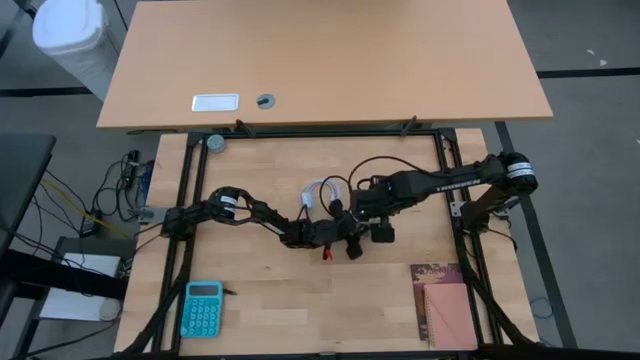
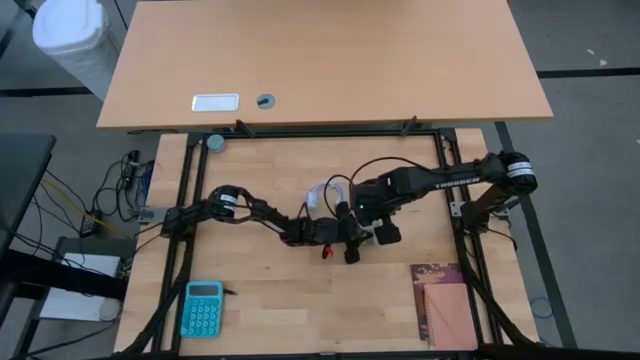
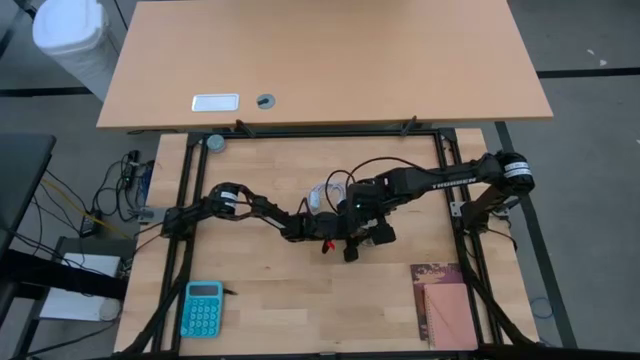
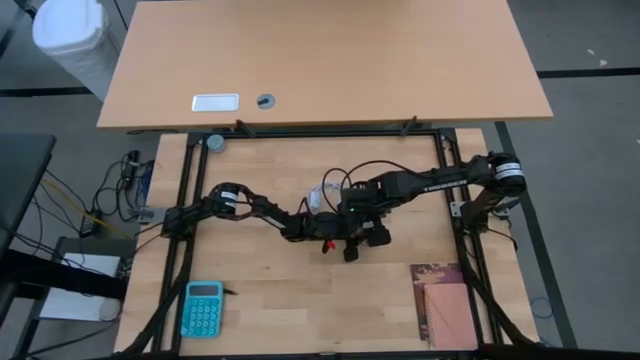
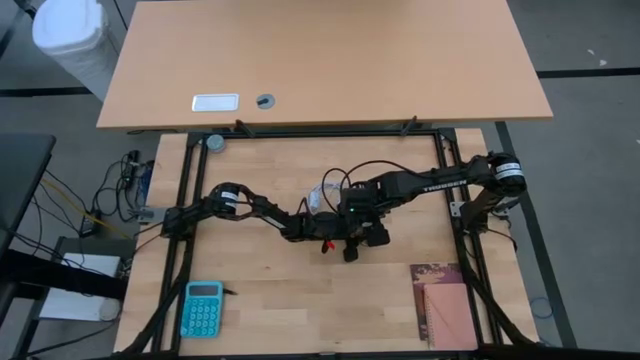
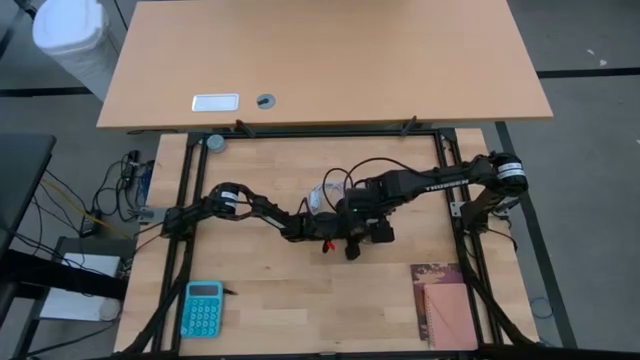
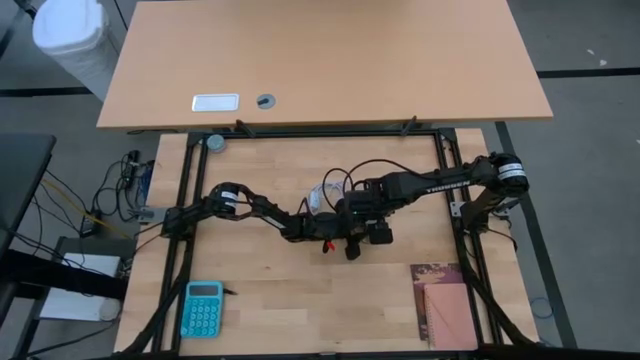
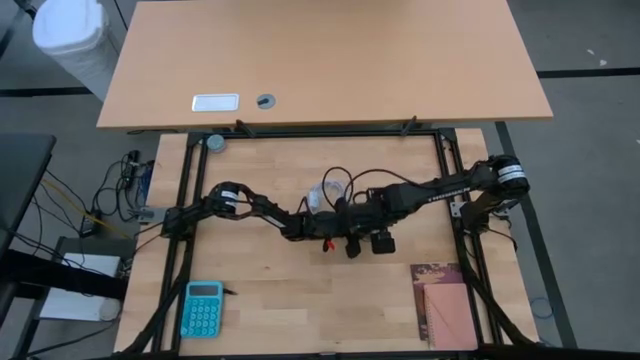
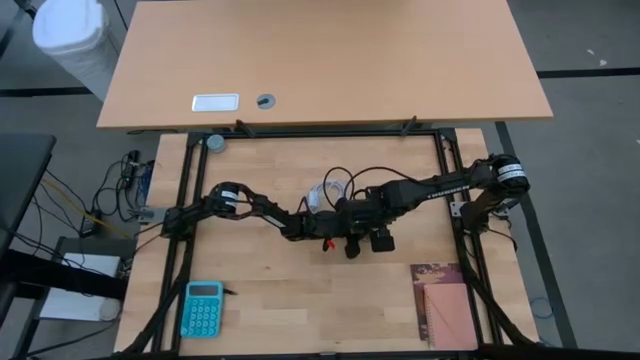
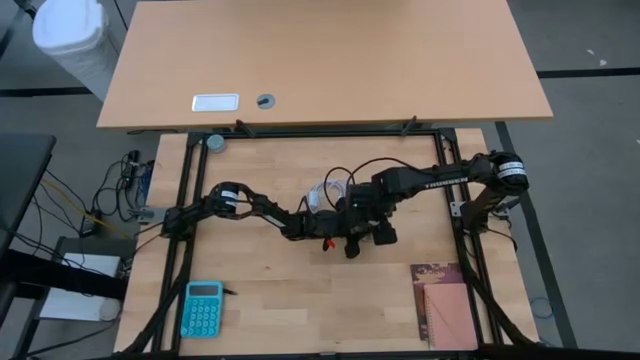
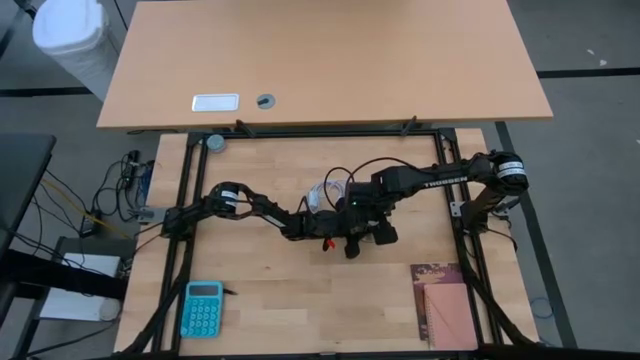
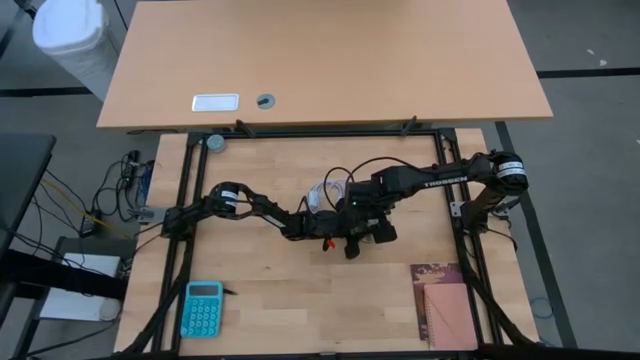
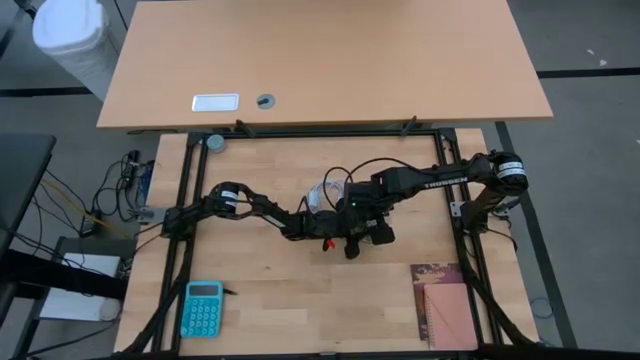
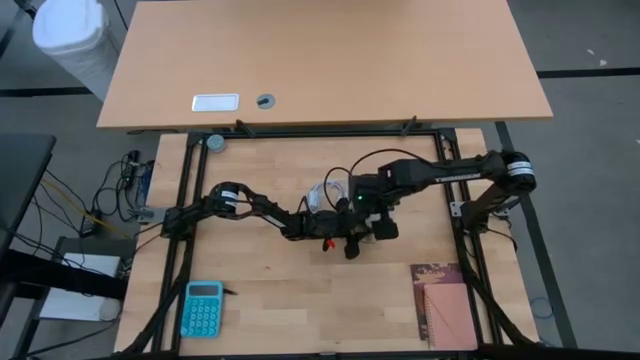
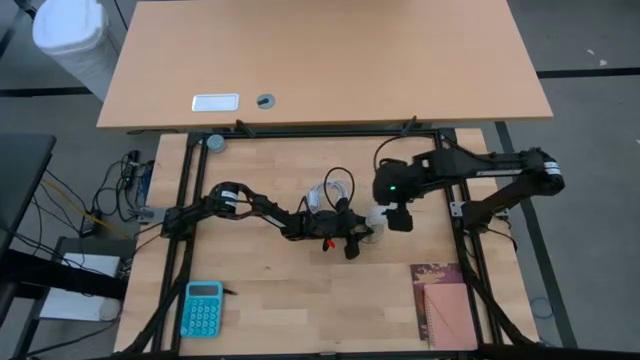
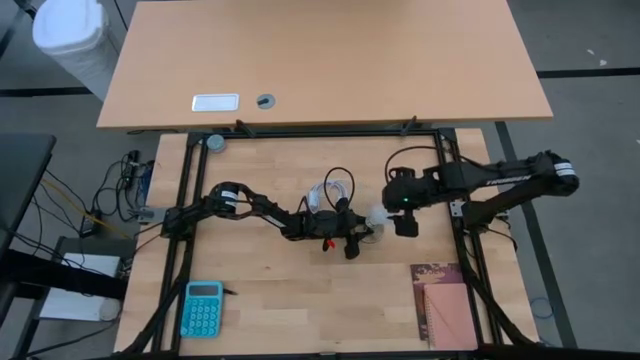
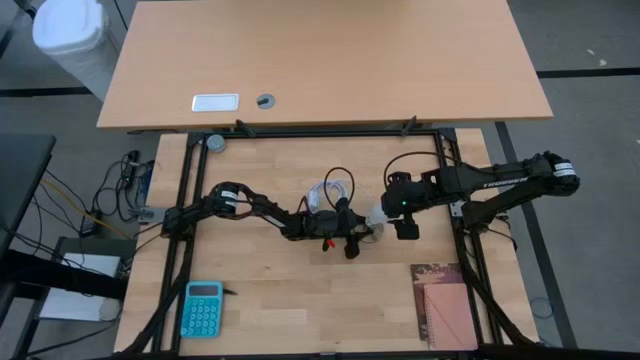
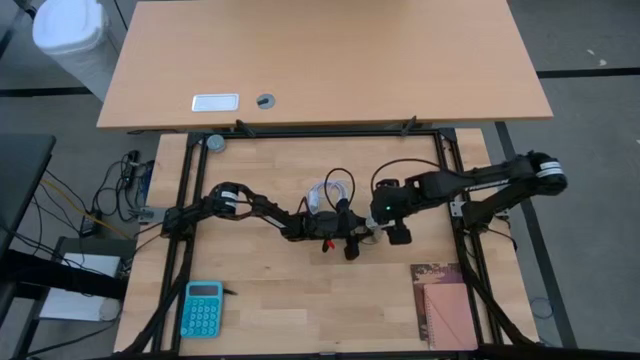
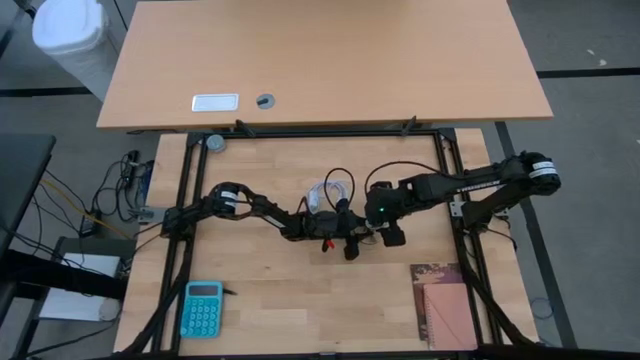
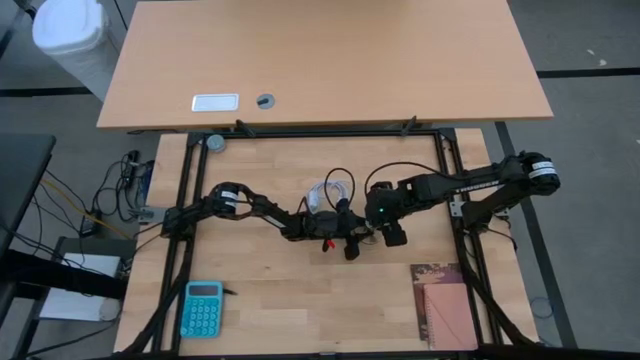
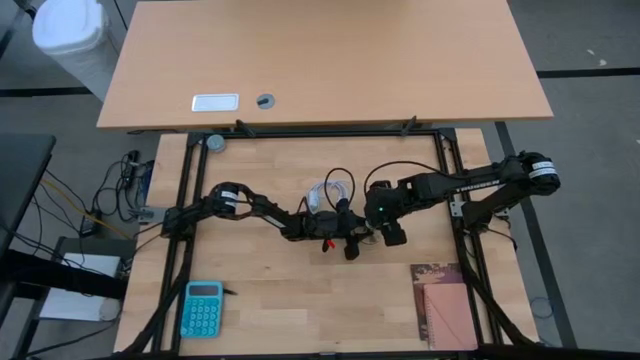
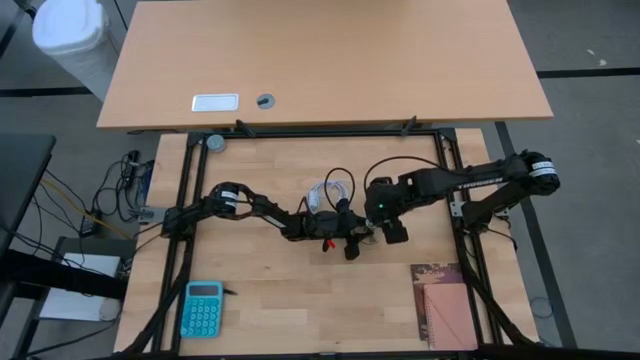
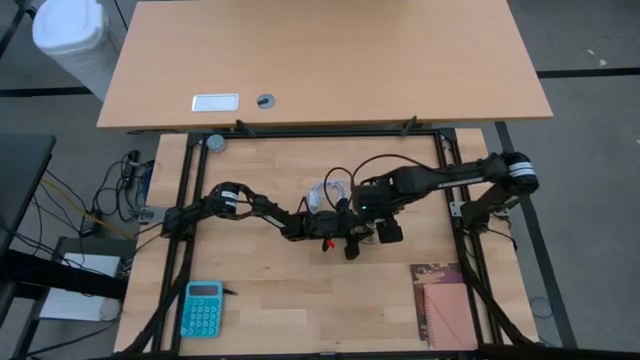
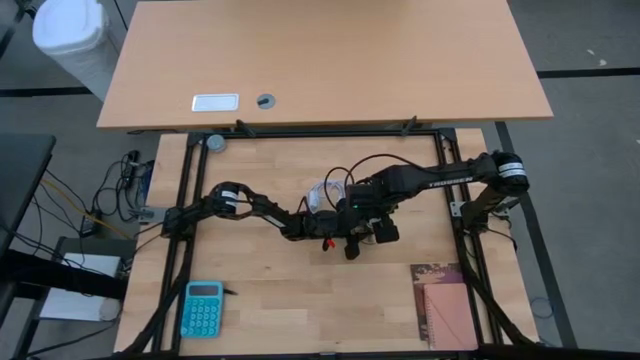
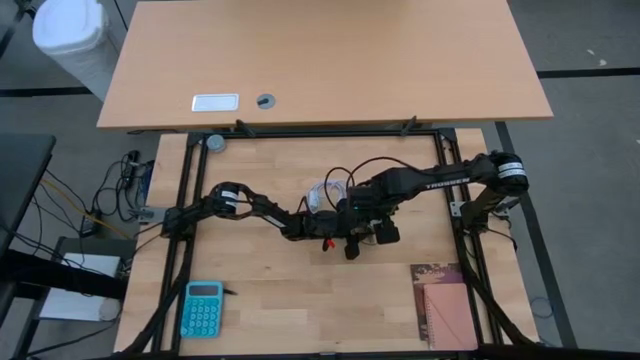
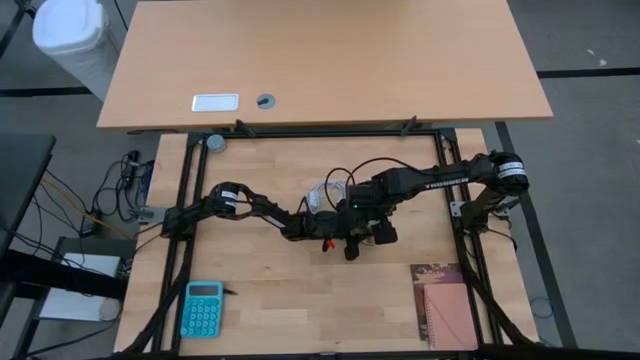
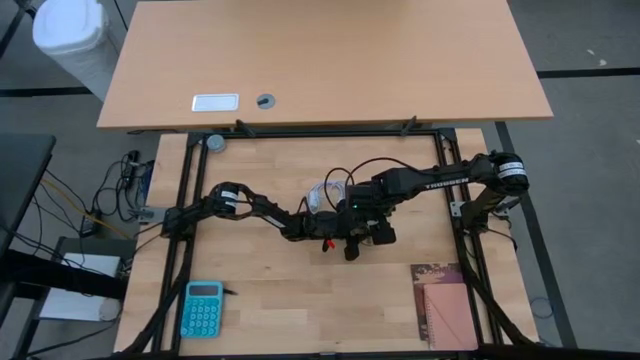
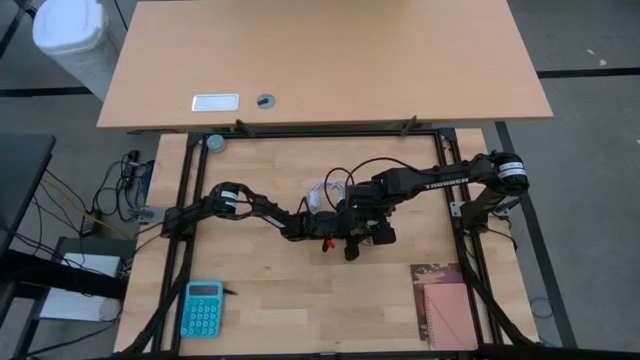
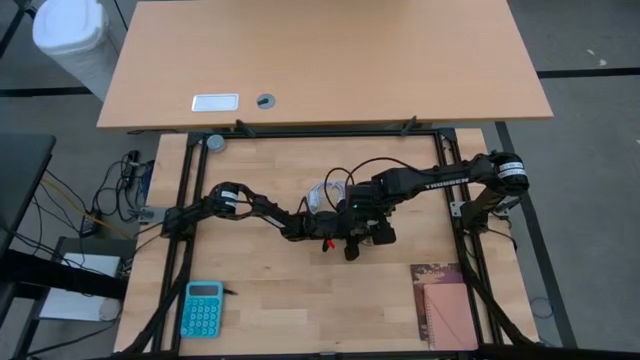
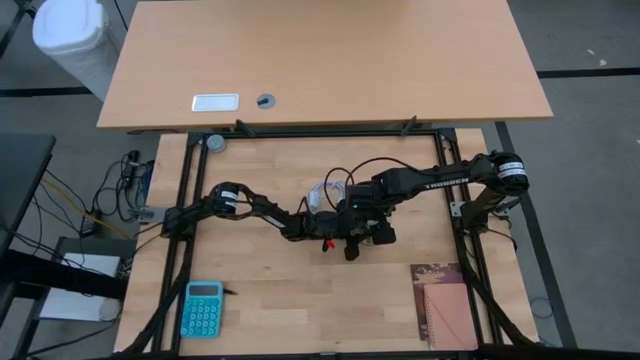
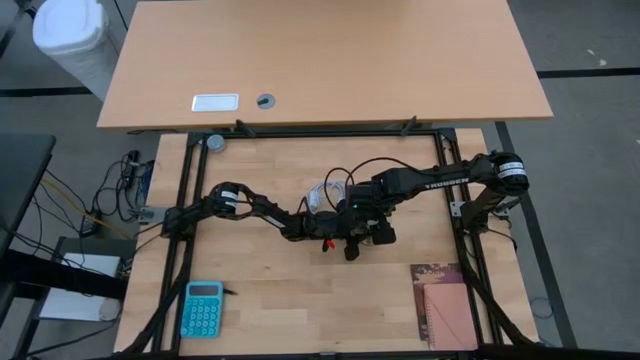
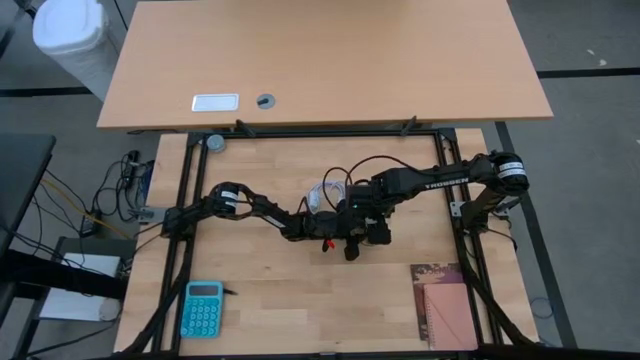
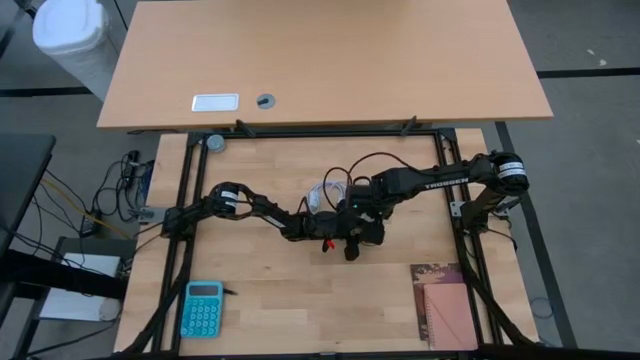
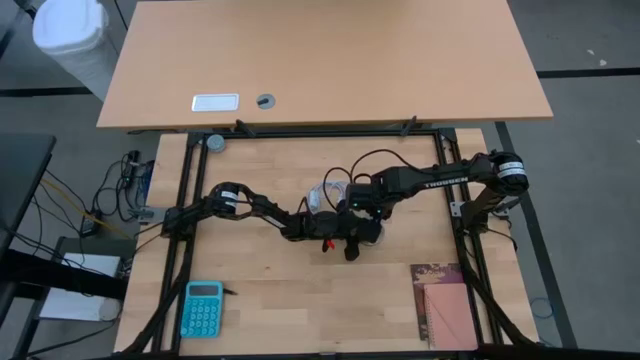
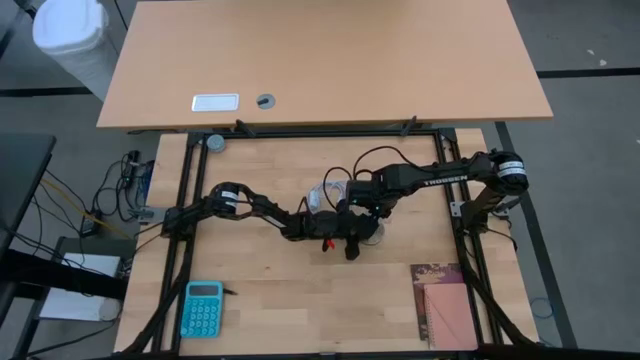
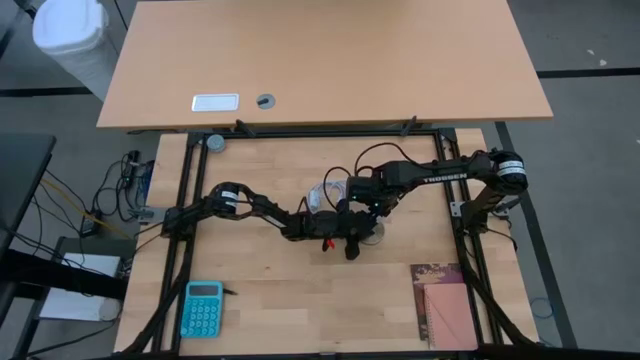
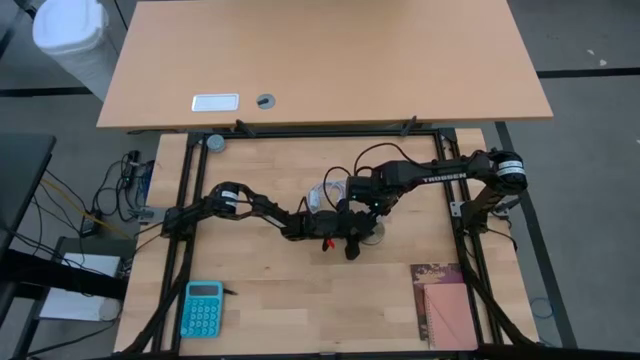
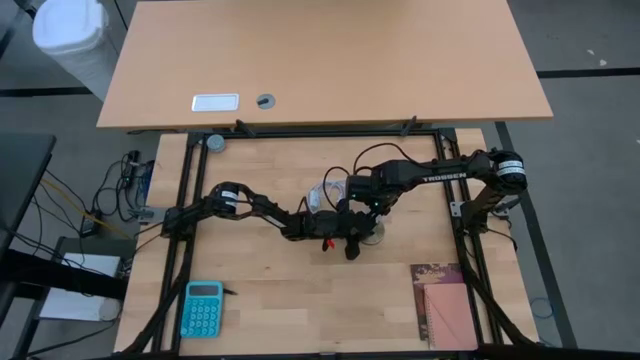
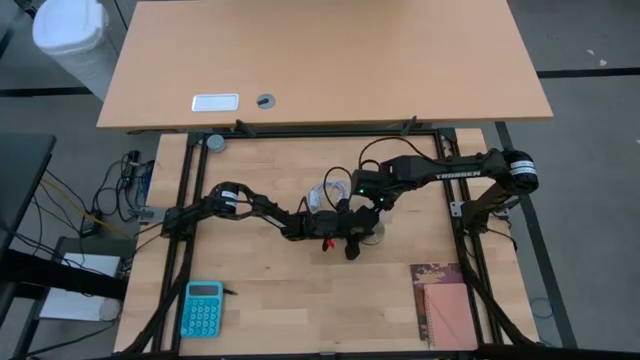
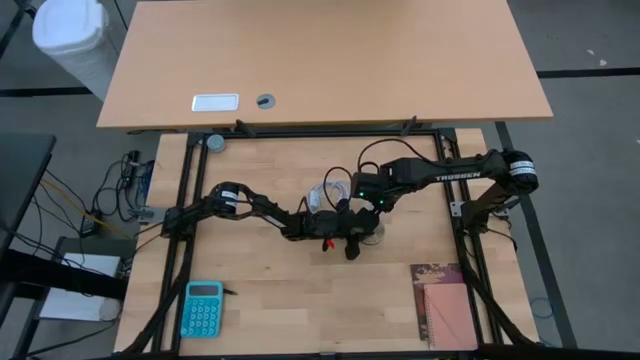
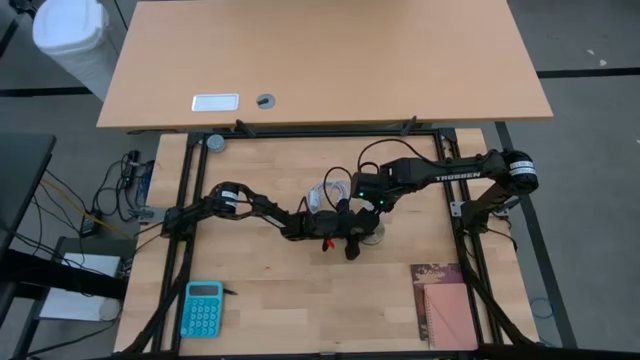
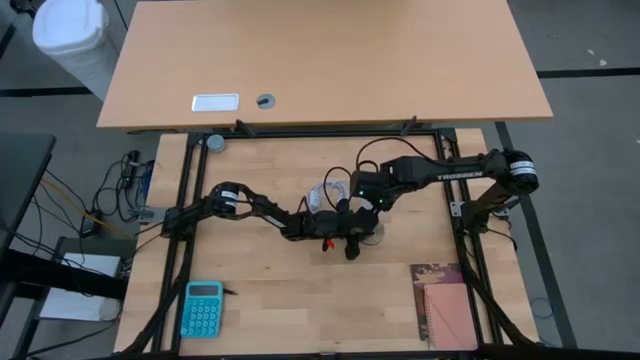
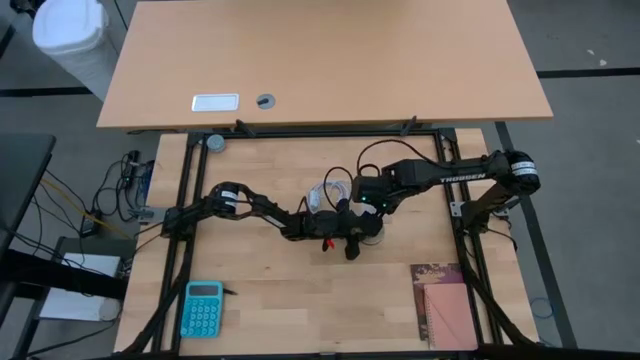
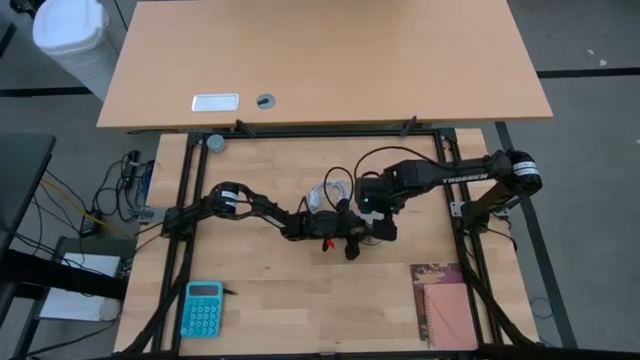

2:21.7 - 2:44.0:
Task: Screw lightbulb
Insert the white lightbulb into the lamp socket
